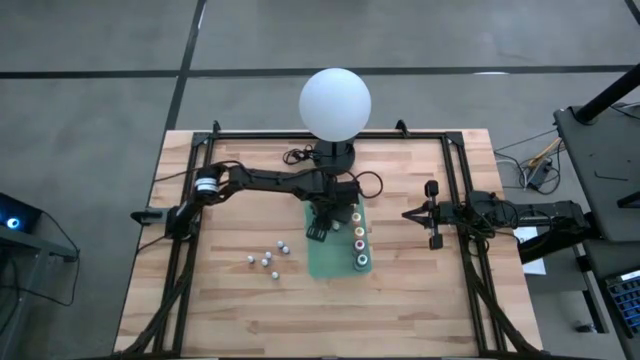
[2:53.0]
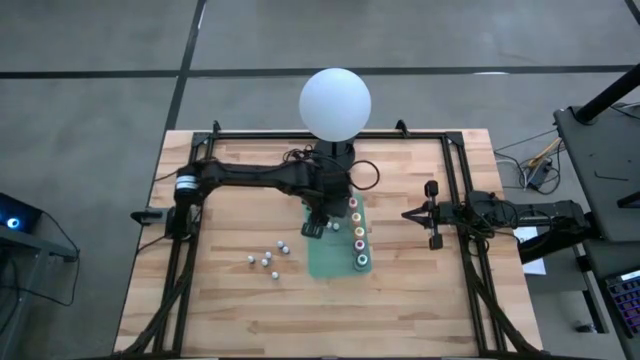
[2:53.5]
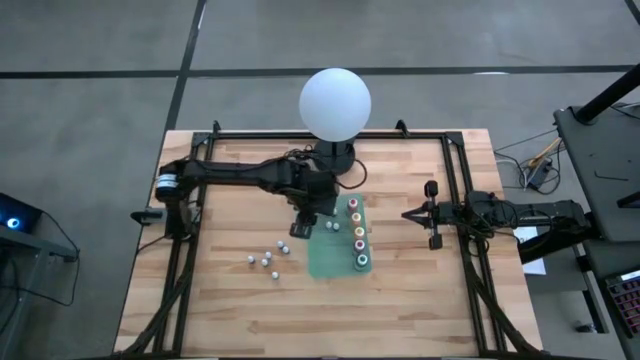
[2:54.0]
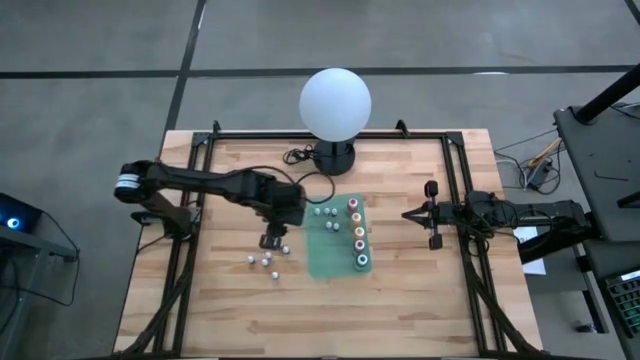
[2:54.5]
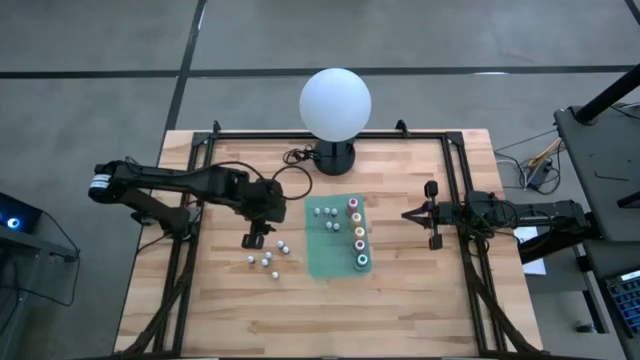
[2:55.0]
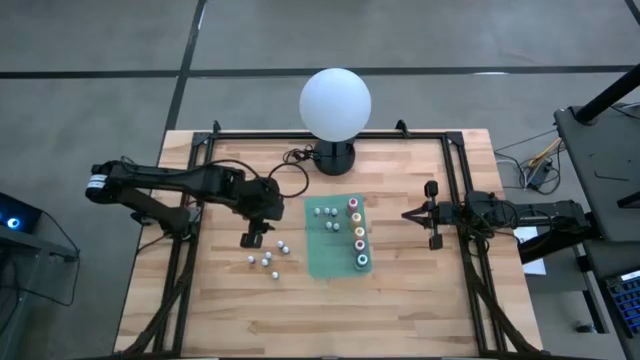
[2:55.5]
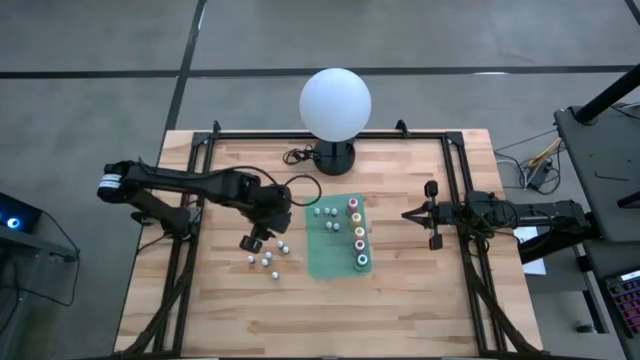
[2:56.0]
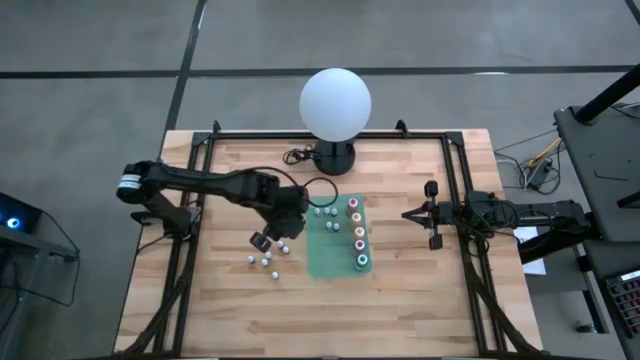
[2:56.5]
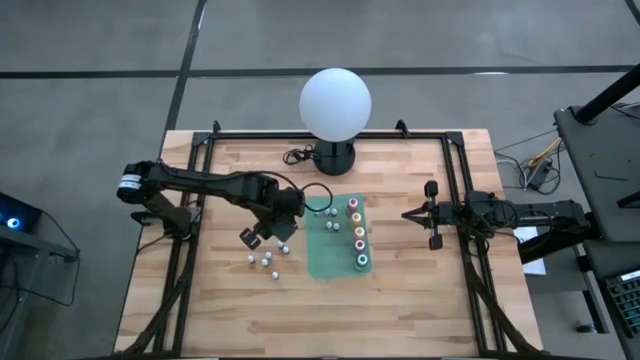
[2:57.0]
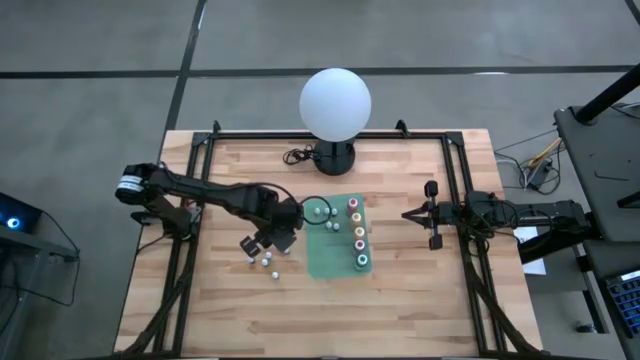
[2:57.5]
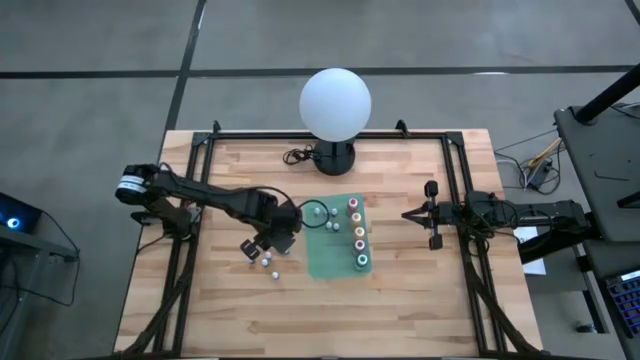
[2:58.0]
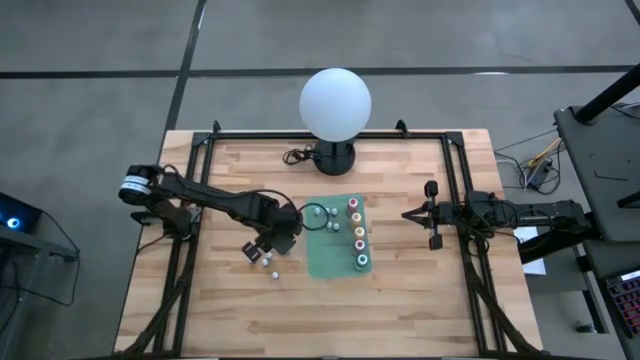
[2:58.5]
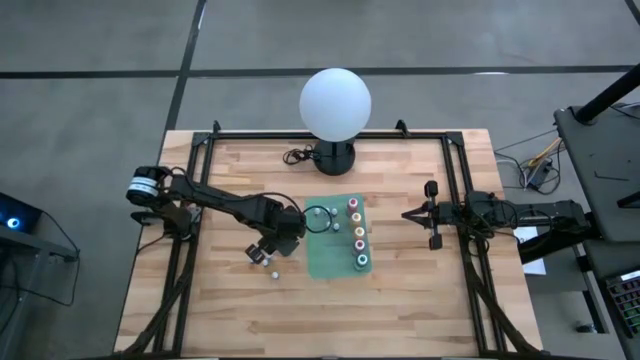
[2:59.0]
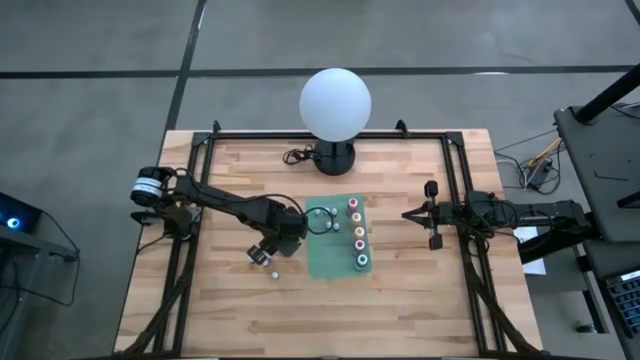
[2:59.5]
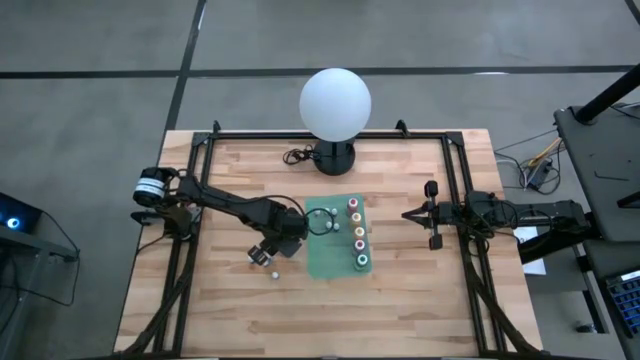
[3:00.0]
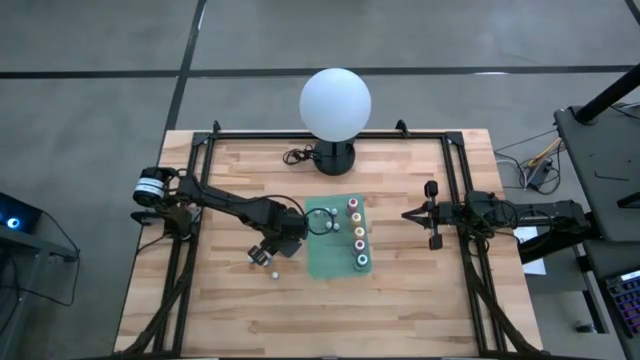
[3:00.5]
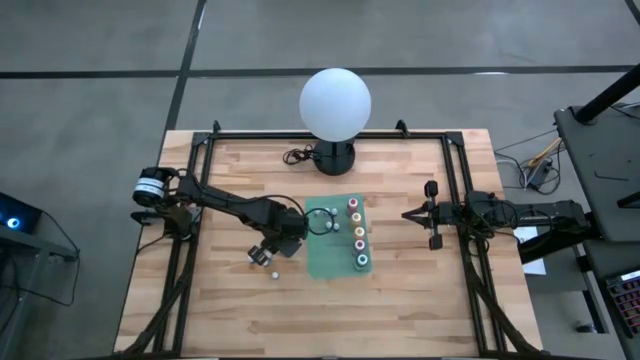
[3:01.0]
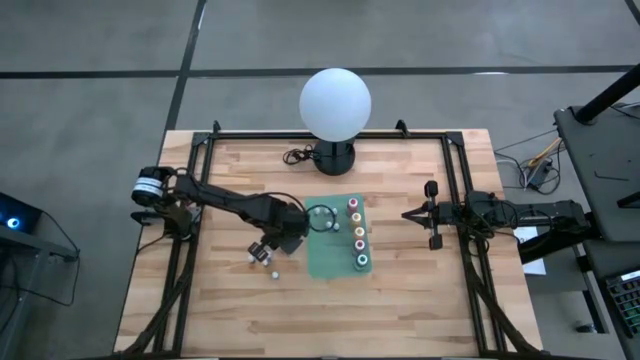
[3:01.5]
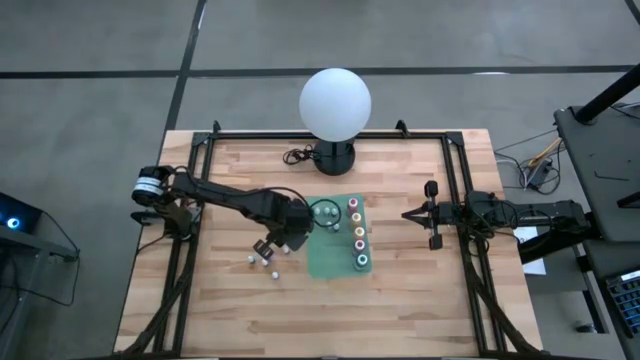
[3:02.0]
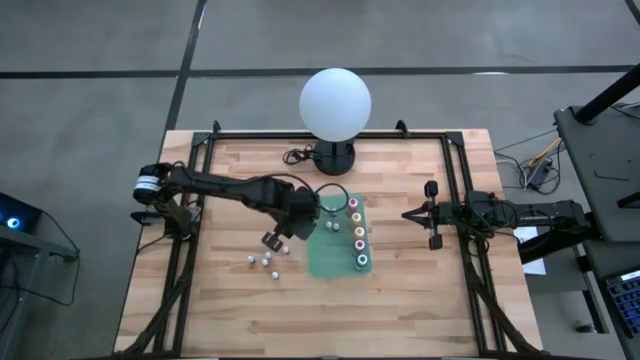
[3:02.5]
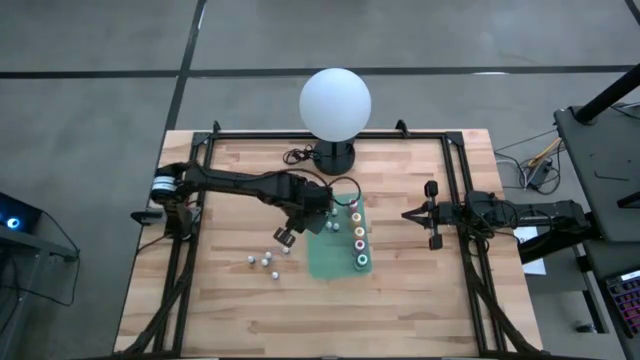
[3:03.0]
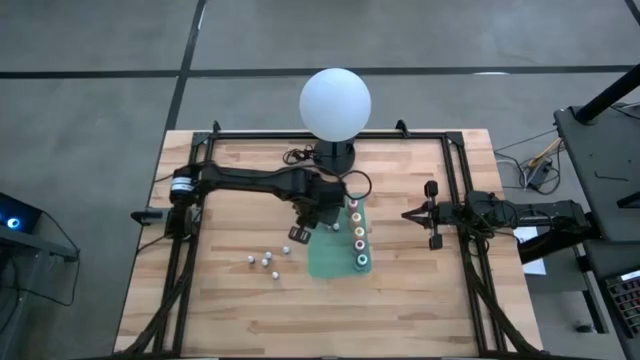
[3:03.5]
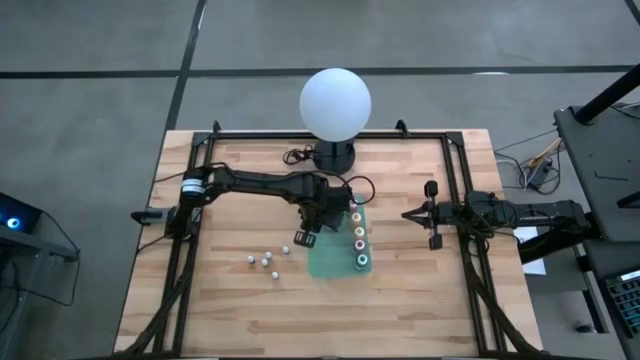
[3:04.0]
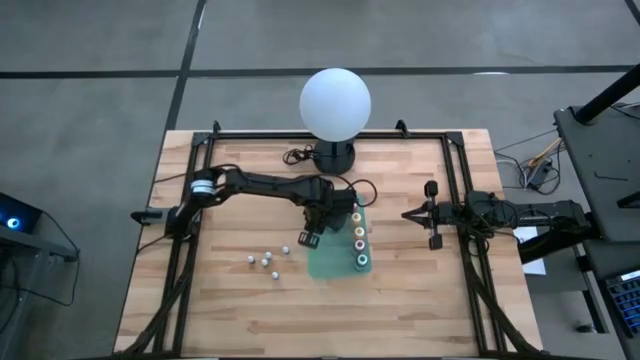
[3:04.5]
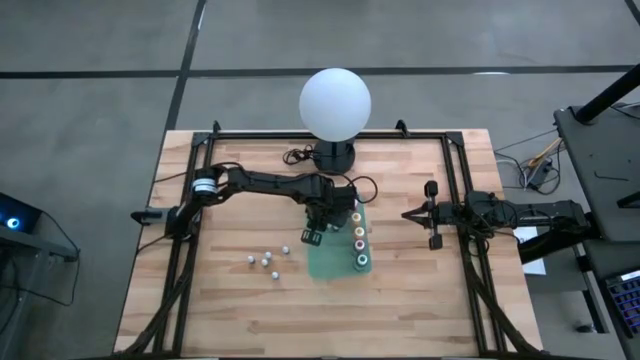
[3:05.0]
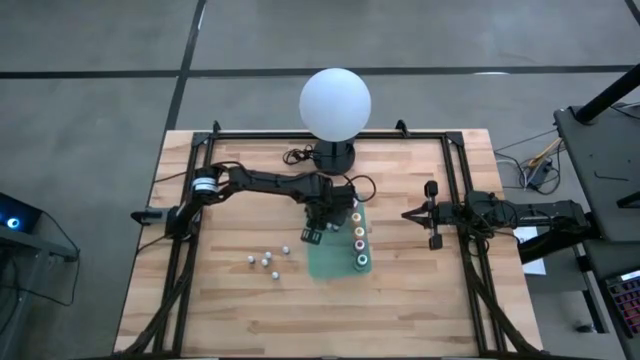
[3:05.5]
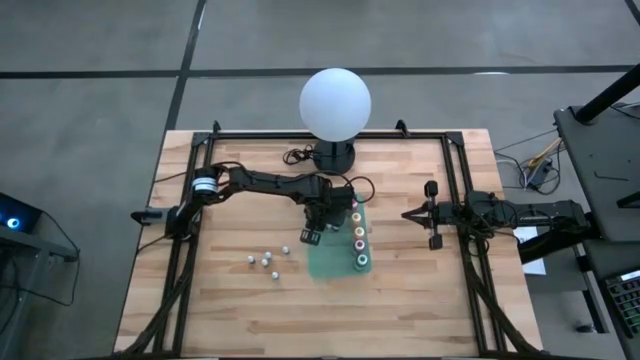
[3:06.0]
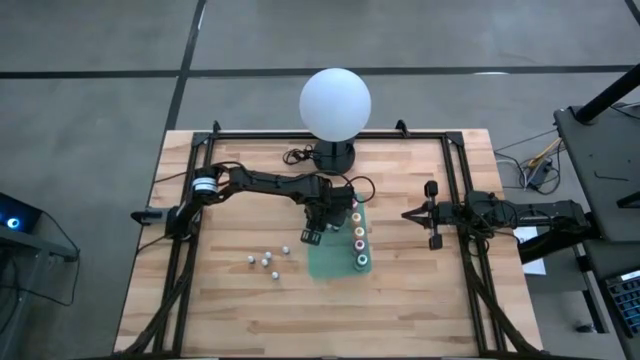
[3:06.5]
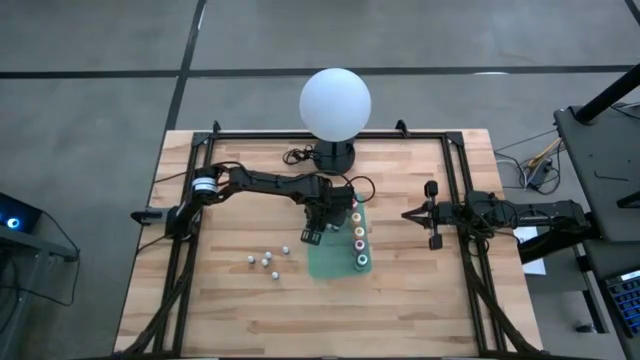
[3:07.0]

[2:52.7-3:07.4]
Task: Pick & Place food coloring
Put the top small blue food coloring bottle into the green bin

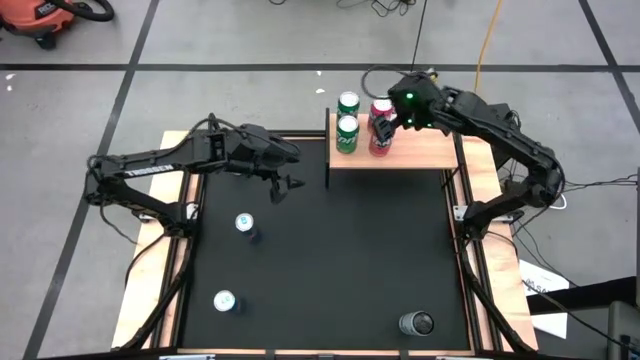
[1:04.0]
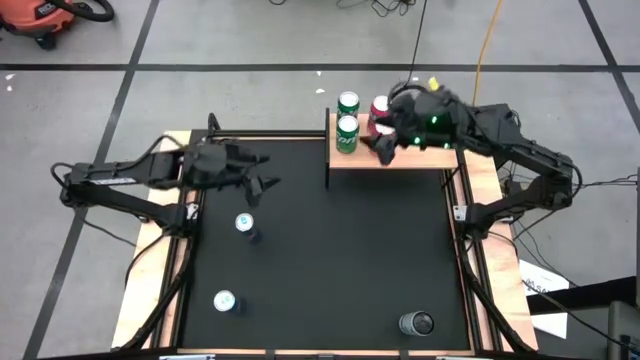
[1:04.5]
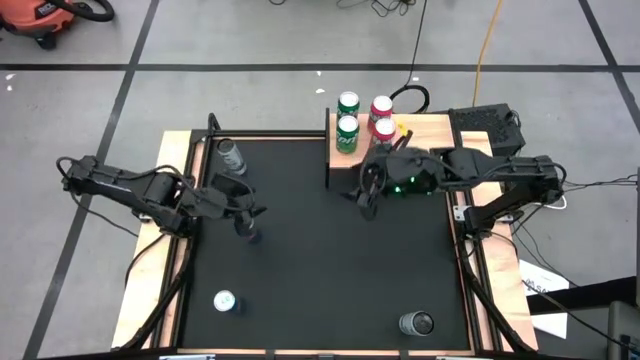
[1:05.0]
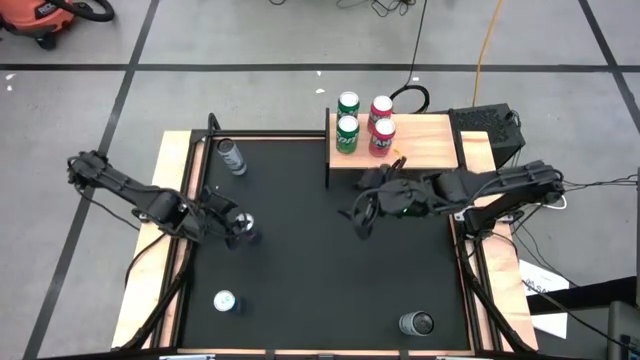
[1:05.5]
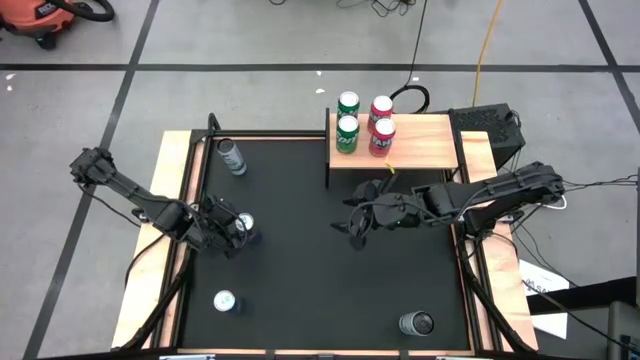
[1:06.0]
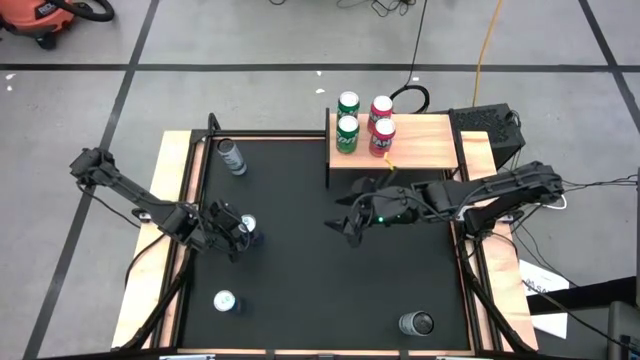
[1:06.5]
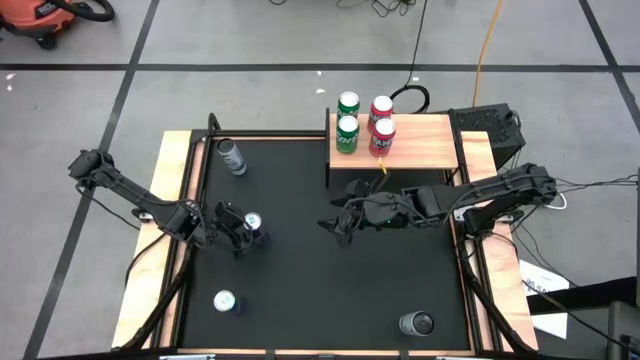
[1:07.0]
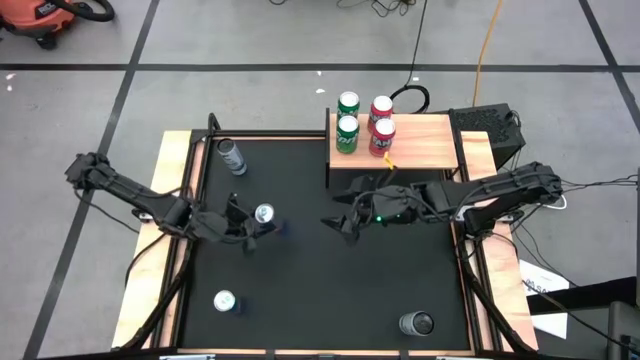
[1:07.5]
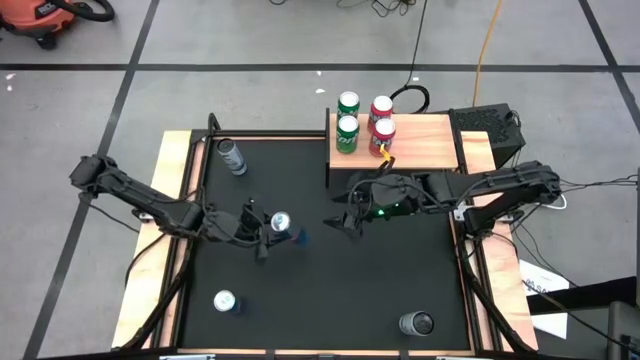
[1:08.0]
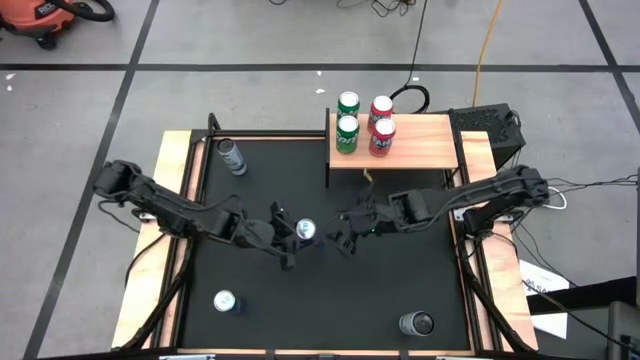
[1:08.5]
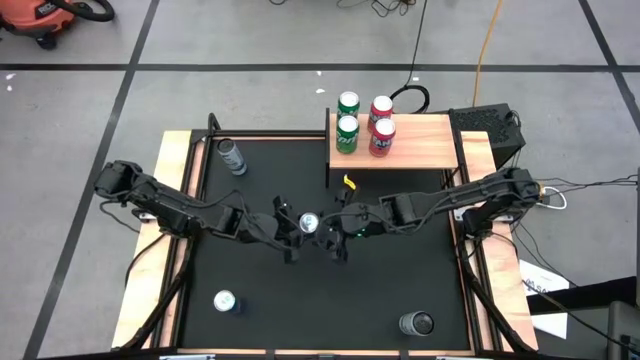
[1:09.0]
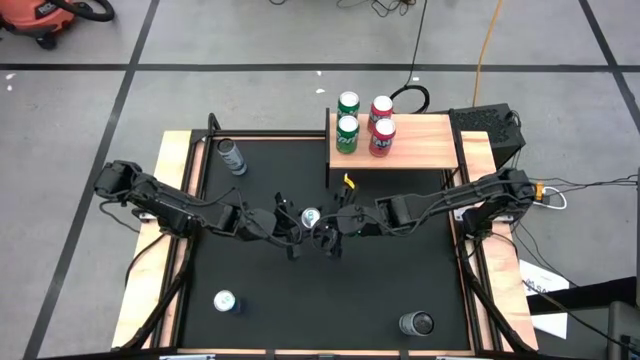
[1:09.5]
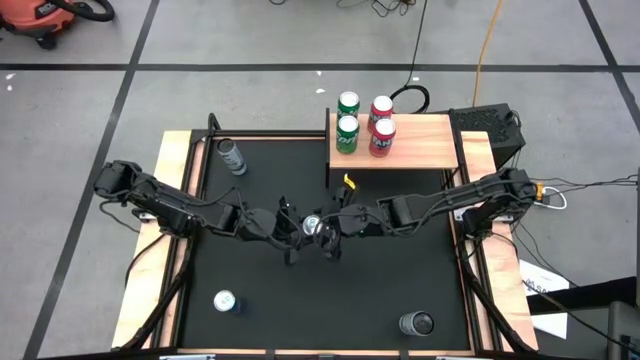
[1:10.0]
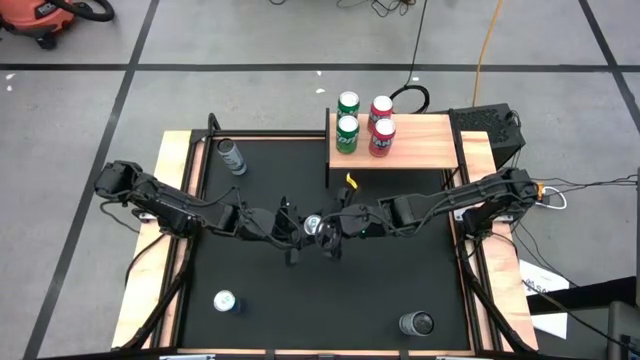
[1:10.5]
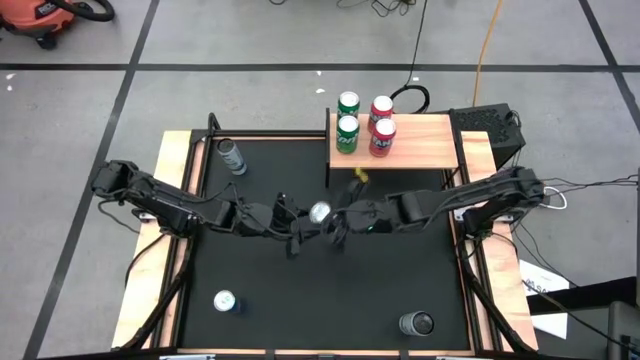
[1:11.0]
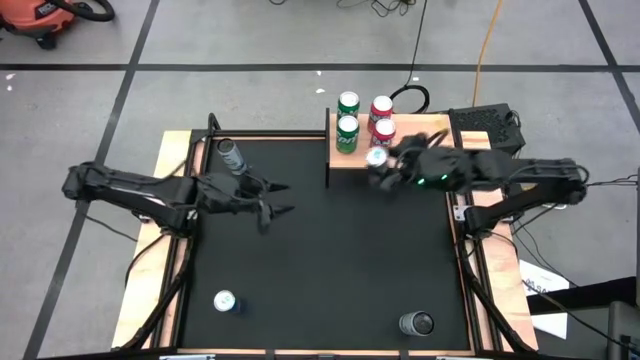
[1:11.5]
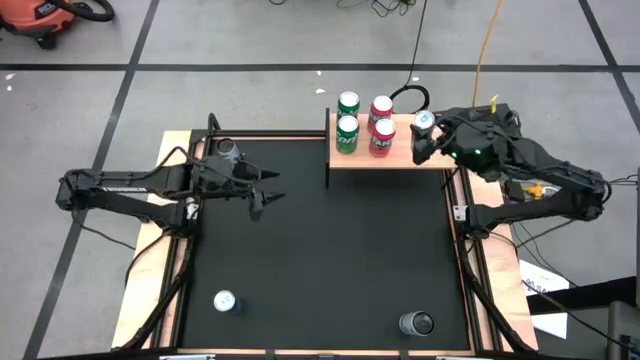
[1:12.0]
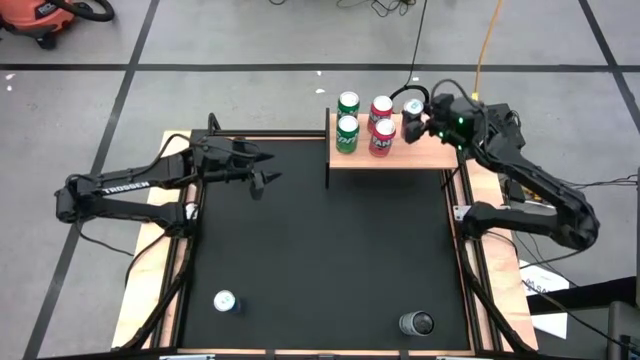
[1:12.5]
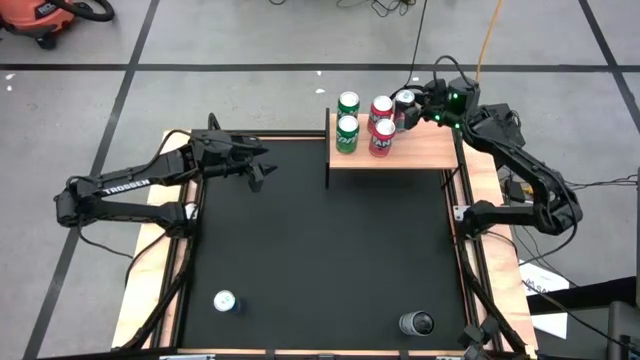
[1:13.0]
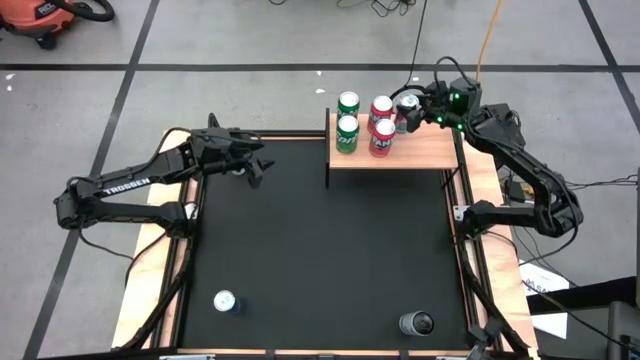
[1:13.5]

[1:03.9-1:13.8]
Task: Place canned beverage on shelf
Put the top blue soda can on the shelf
